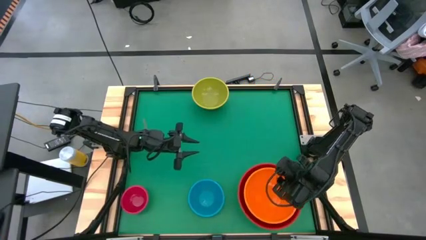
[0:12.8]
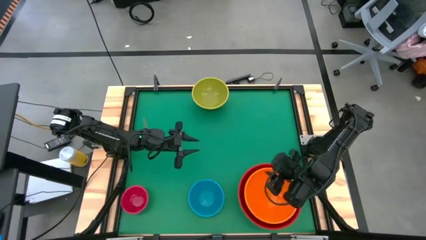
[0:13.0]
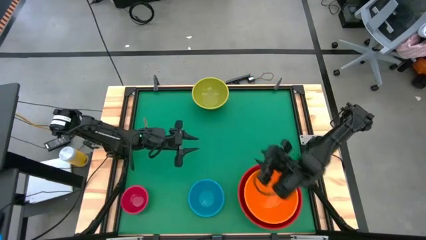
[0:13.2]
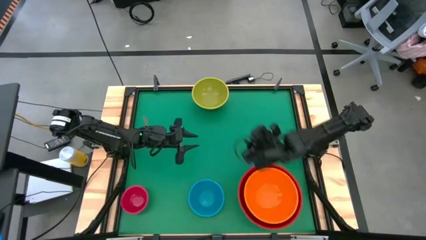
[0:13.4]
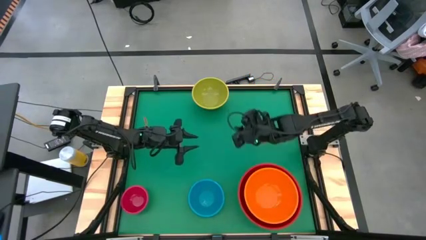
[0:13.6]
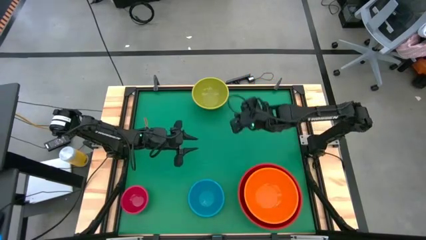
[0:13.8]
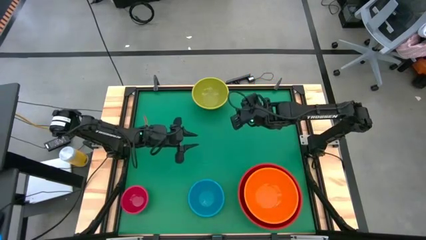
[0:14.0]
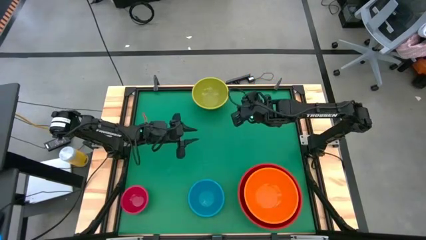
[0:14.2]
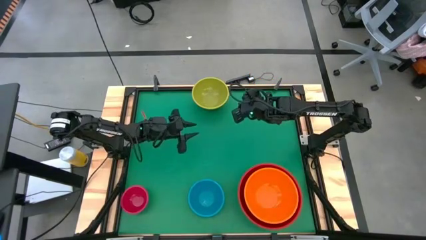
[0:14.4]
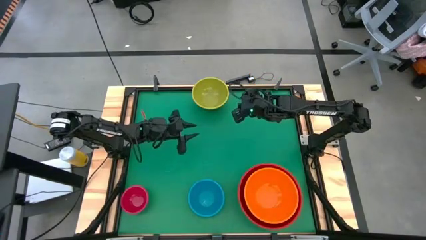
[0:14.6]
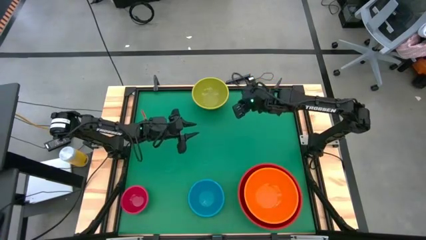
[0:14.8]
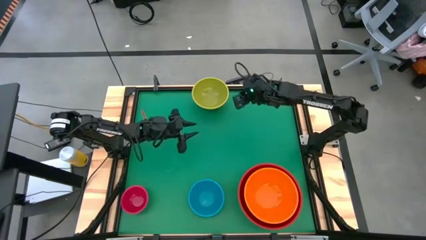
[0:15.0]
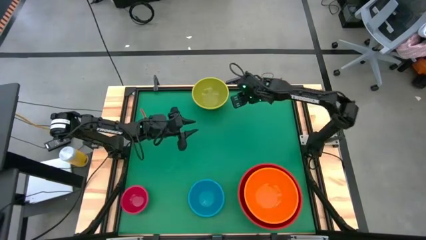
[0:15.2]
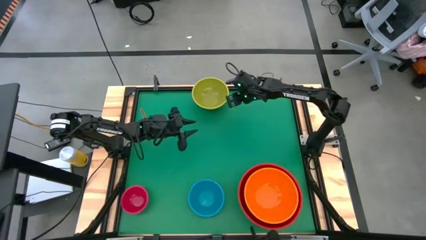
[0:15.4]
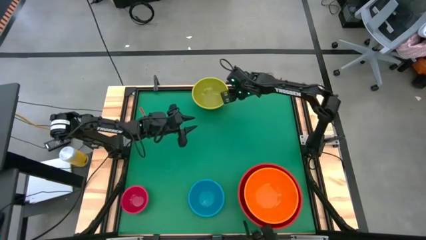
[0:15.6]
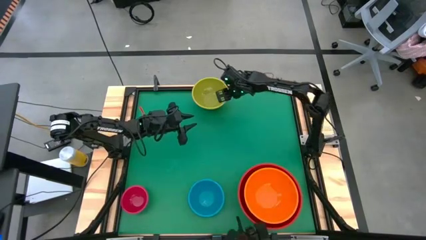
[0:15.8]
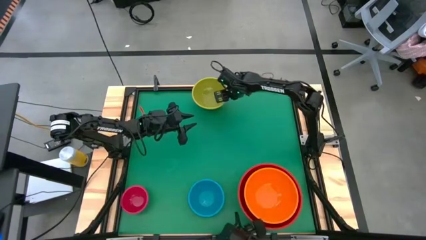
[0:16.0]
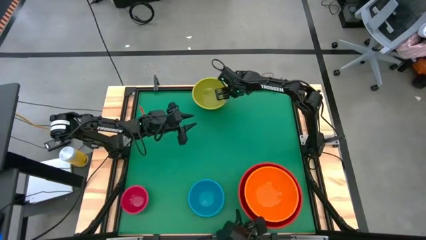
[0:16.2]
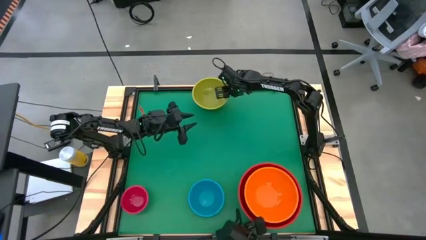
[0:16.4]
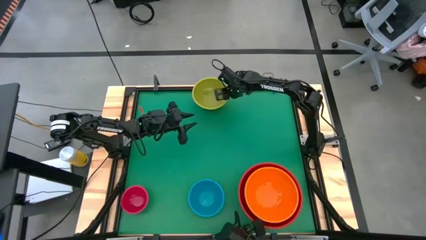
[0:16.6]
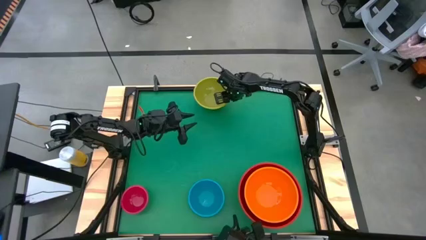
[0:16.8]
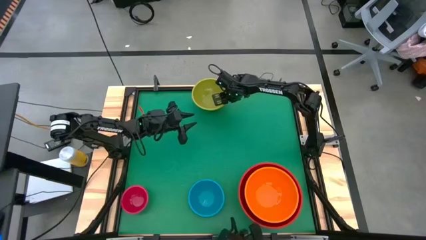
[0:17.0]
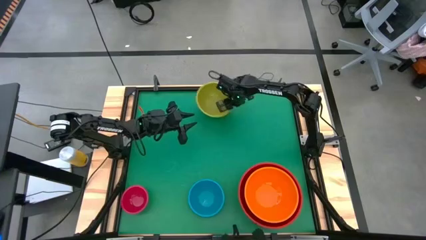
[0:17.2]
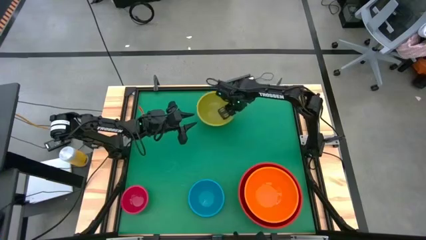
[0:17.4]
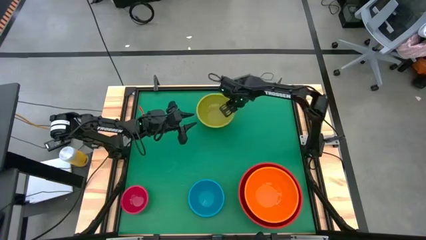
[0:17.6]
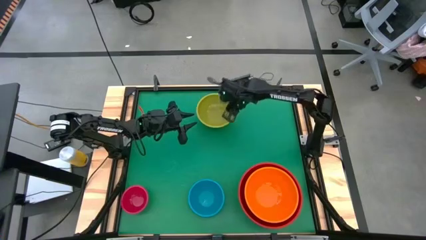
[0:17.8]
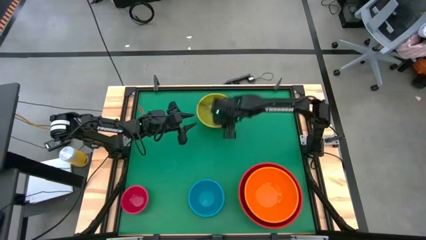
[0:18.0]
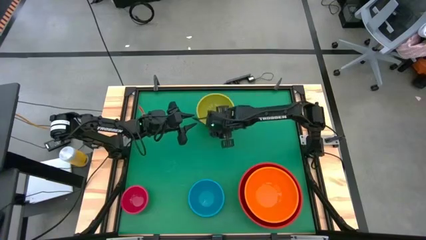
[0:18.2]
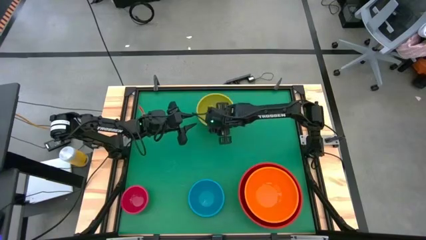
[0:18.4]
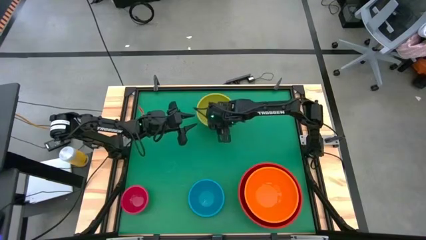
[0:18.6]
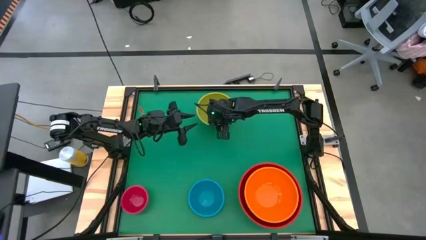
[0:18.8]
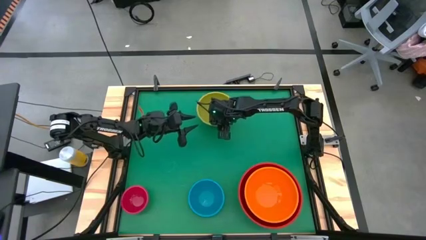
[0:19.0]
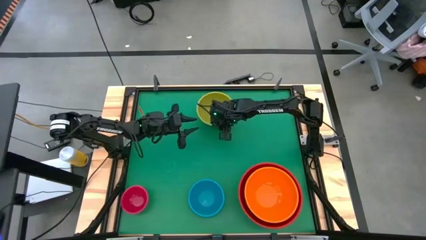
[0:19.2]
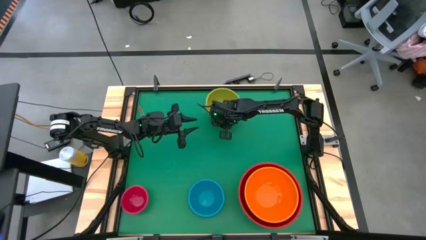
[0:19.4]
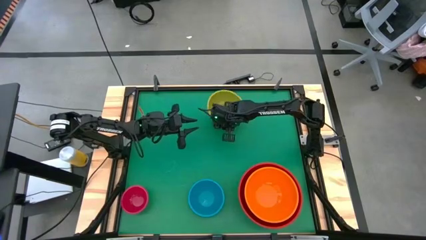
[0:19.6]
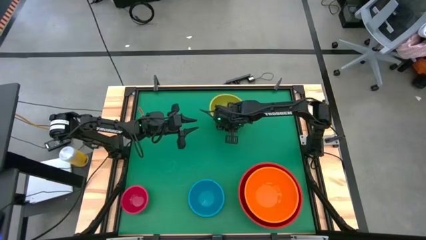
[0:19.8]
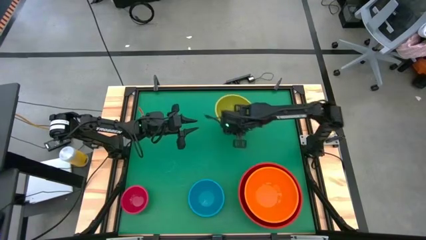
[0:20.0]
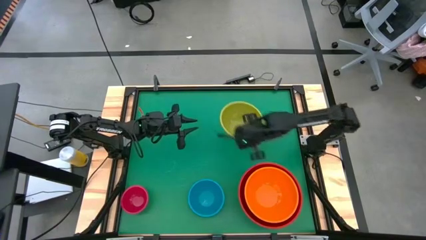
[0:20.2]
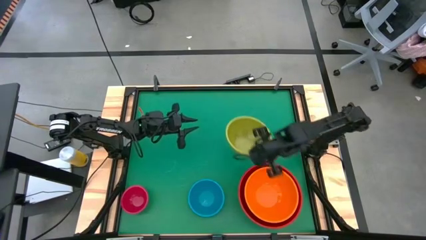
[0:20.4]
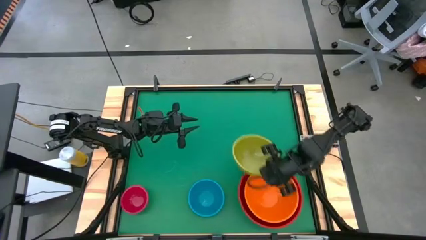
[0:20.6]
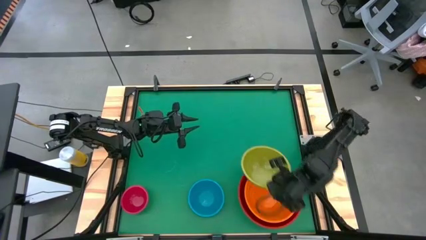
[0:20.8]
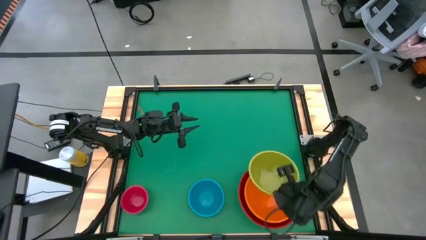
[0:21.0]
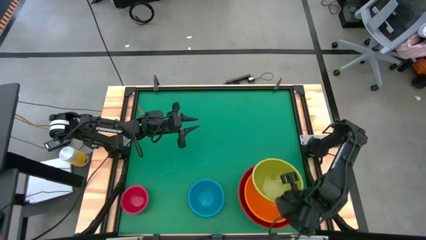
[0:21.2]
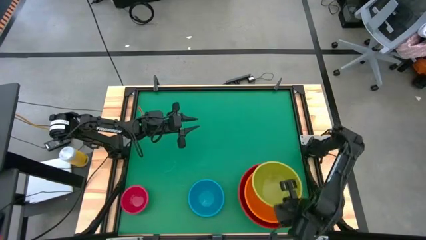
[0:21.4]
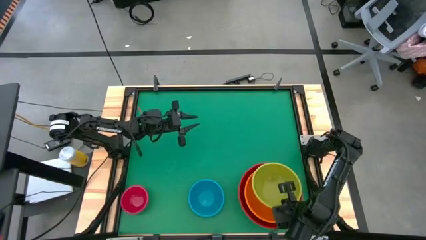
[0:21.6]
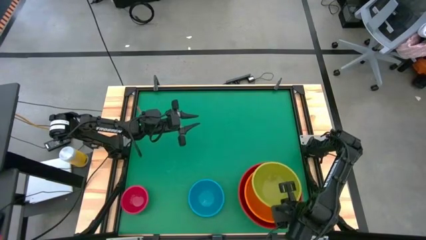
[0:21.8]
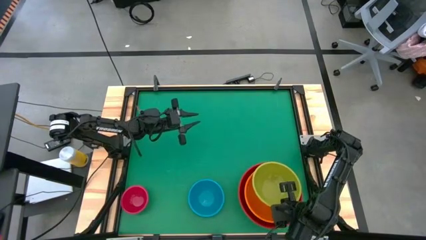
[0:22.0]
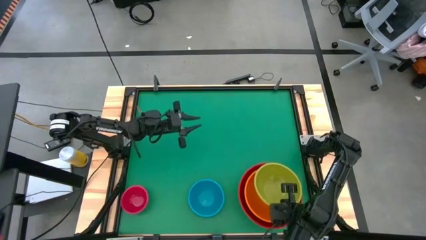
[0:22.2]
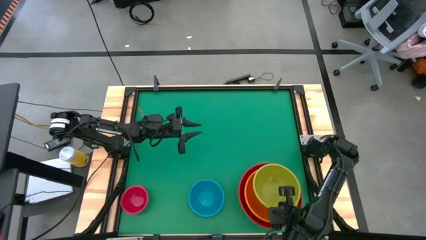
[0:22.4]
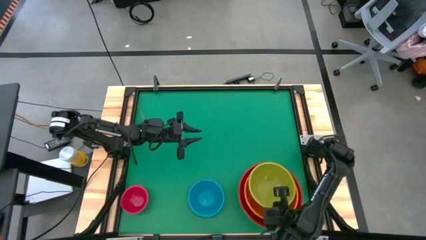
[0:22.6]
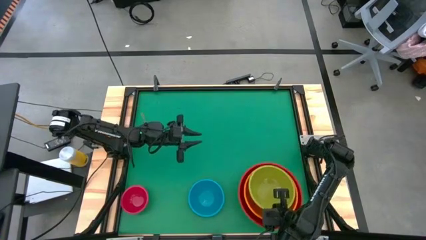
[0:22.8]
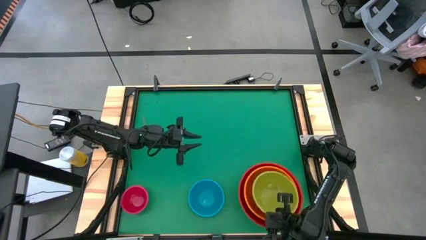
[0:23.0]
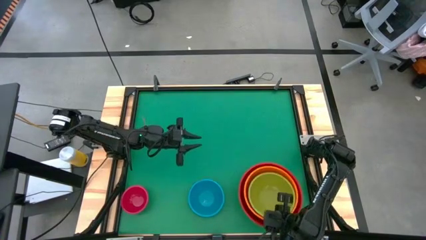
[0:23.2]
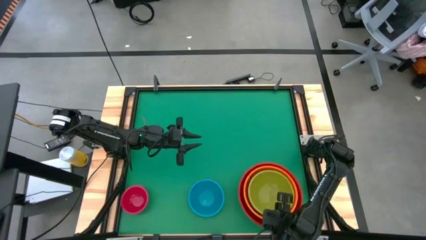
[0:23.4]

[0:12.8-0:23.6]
Stack the green bowl on top of the orange bowl

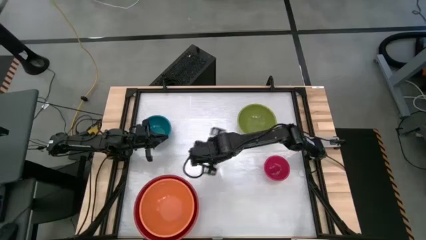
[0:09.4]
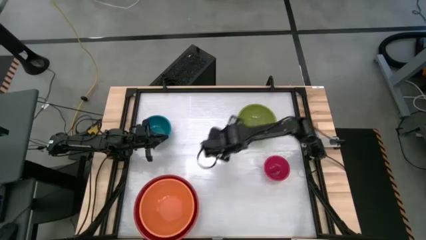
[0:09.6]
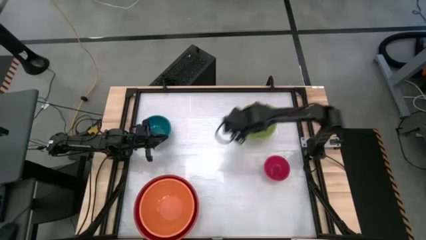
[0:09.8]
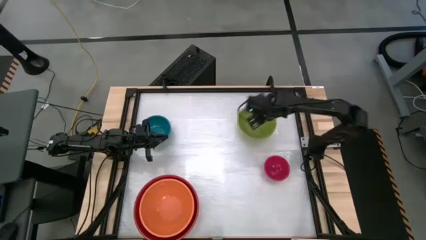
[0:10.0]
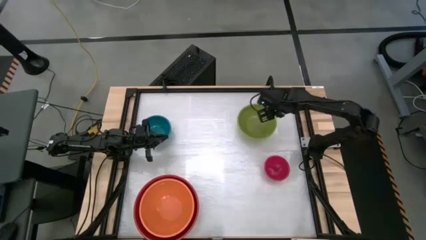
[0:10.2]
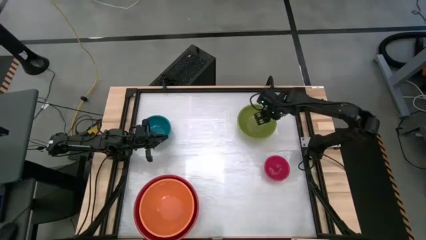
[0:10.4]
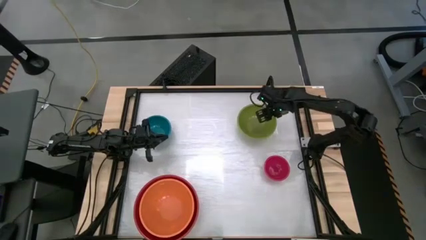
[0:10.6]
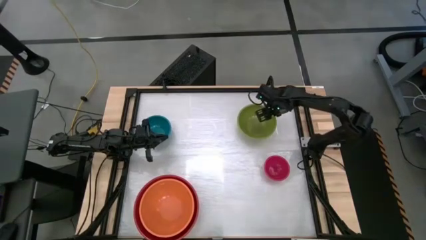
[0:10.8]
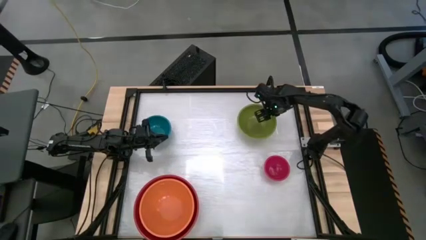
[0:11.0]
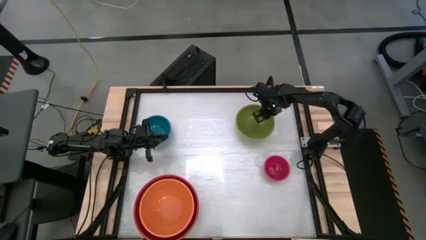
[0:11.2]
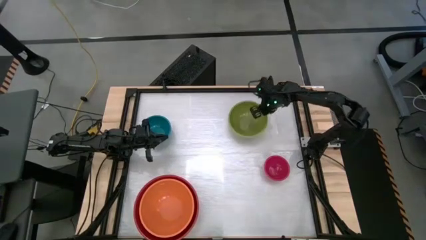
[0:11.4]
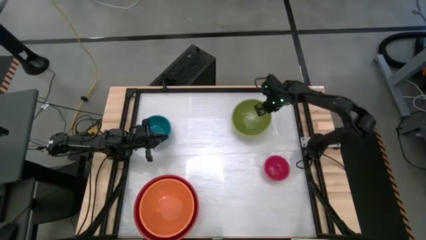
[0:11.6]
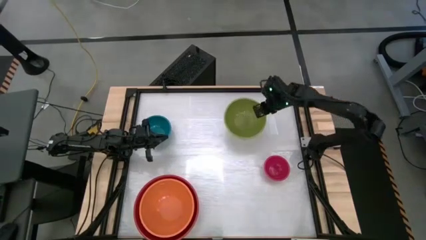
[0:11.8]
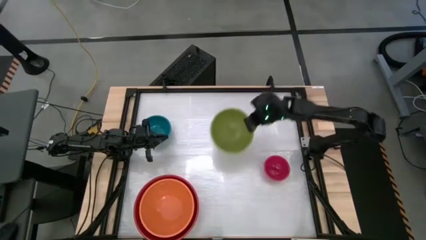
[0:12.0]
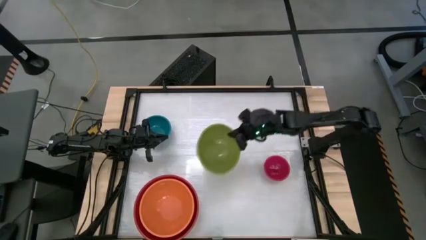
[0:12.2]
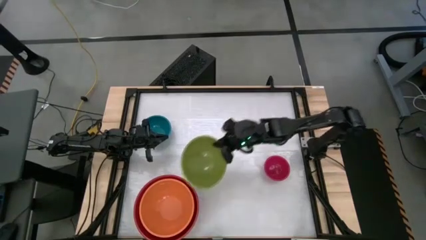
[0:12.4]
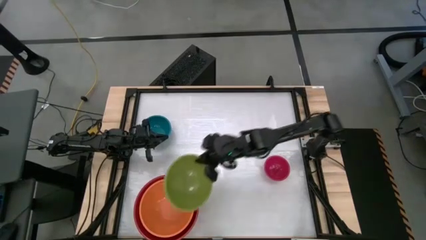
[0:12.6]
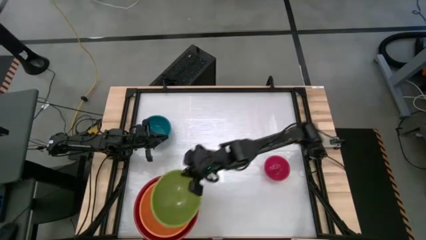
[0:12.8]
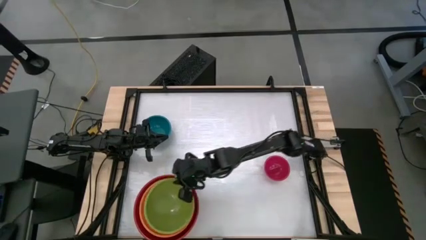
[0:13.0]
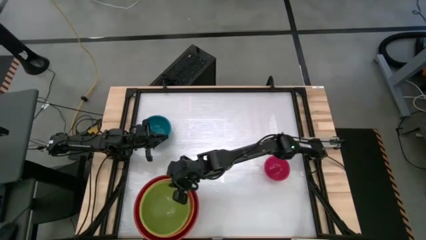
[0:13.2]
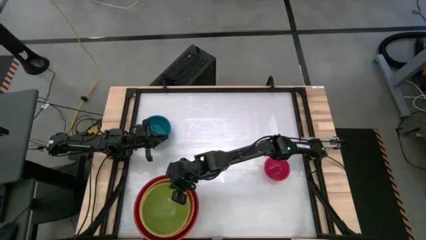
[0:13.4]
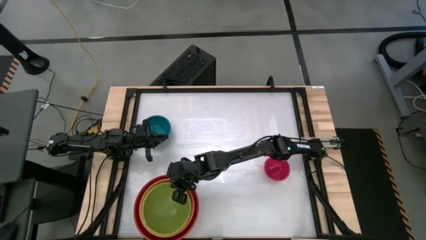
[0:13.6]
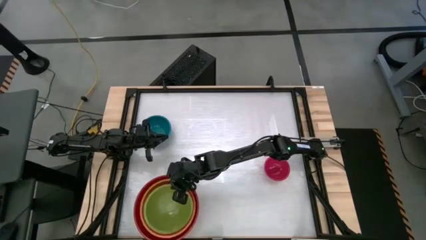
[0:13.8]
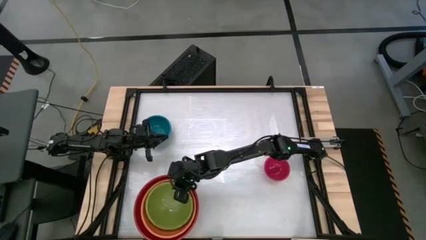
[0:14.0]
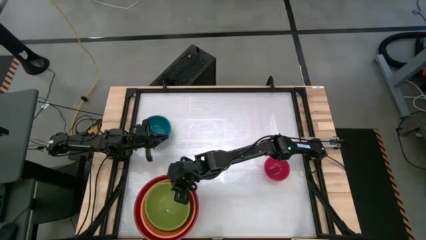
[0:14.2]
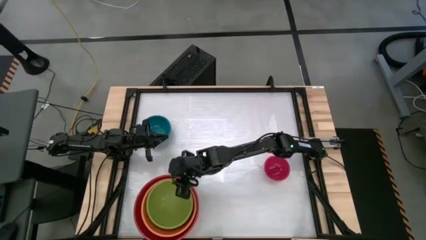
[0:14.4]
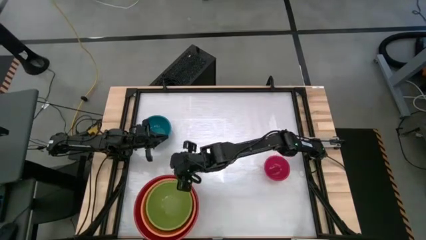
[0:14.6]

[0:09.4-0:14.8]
Stack the green bowl on the orange bowl
